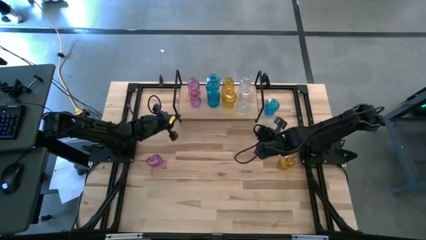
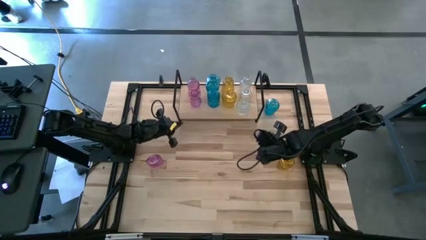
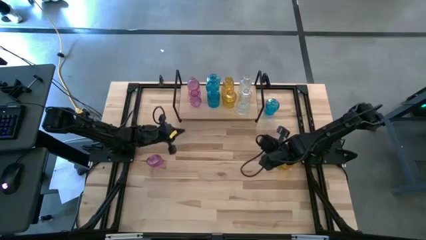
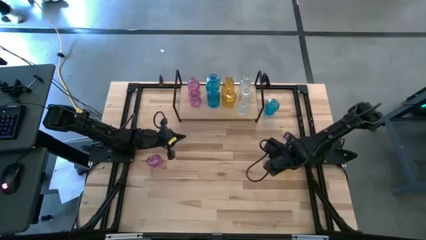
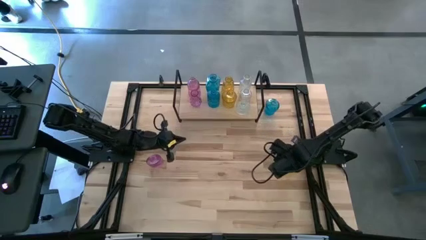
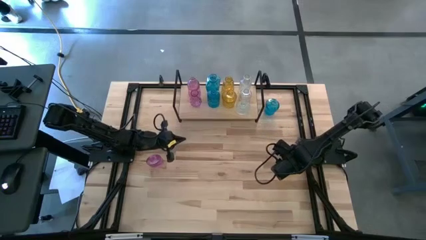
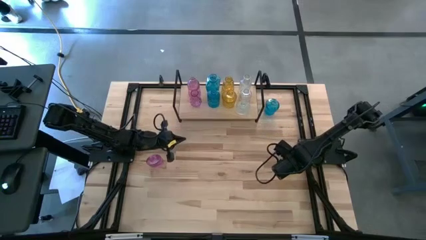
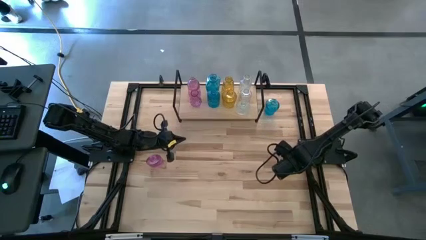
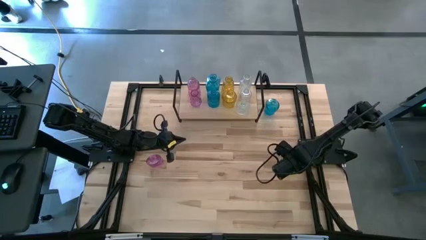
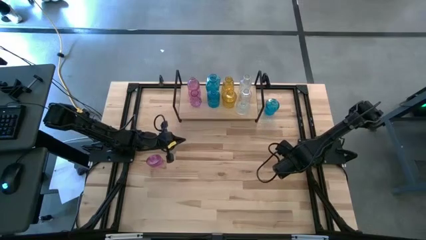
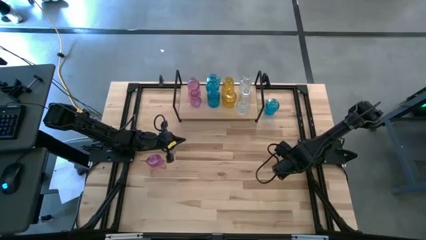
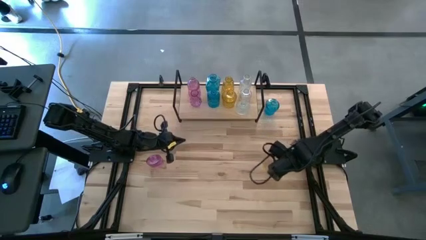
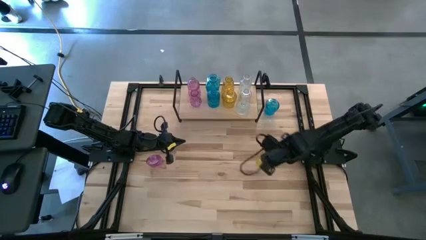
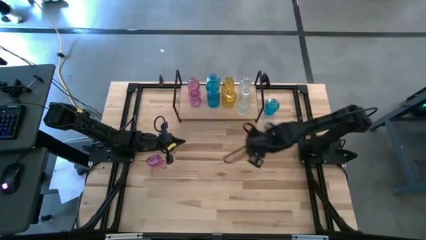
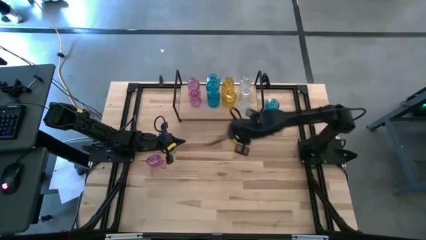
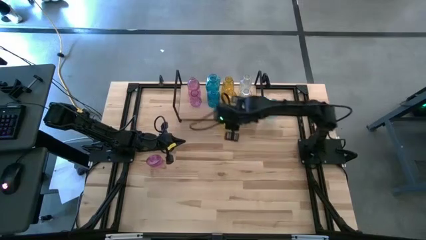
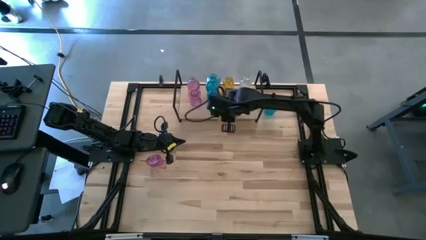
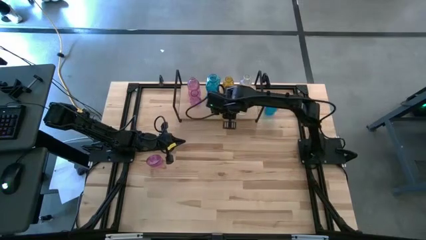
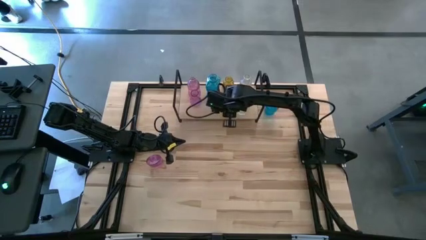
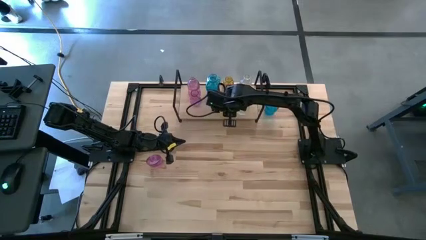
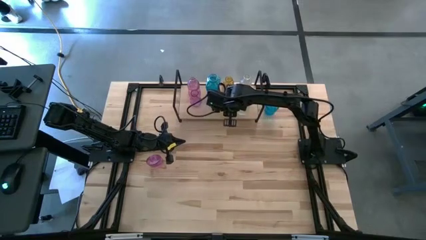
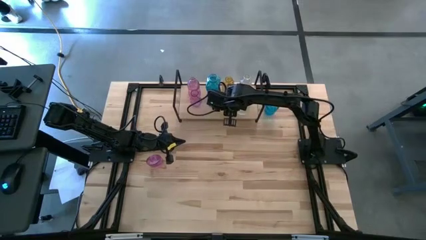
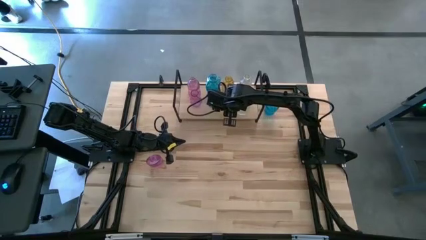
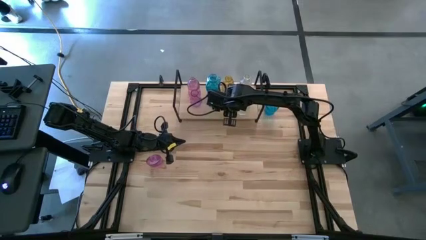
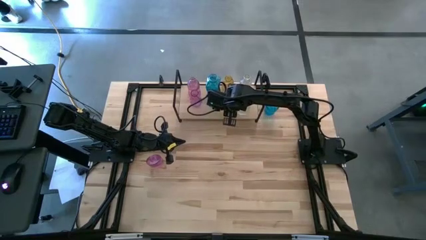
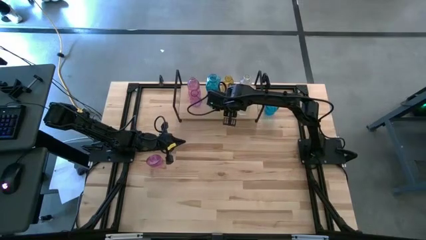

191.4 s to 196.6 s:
Task: sort vases onto shelf
Put the yellow vase on the shelf aligned with the other yellow vase

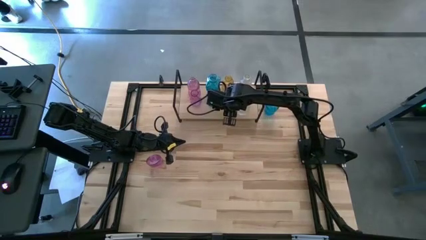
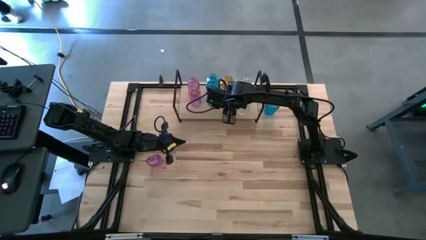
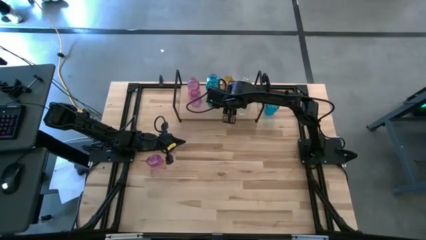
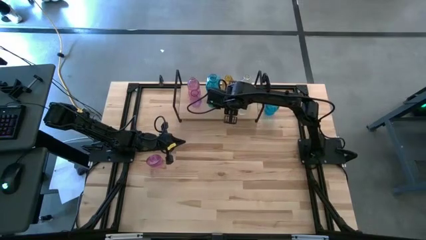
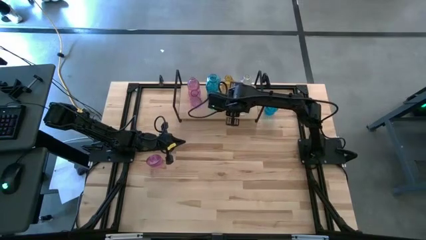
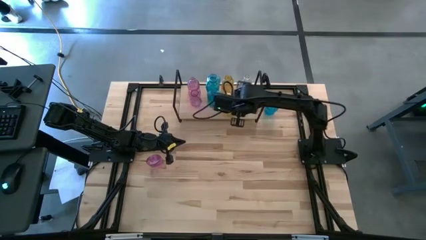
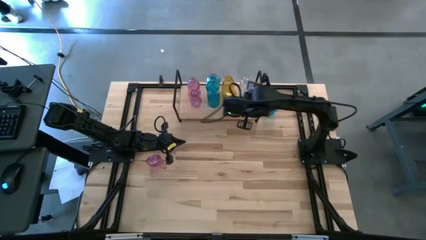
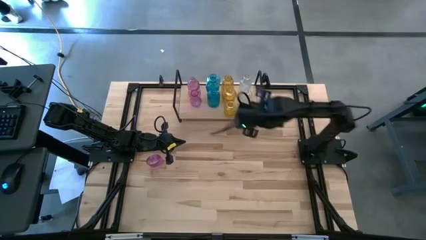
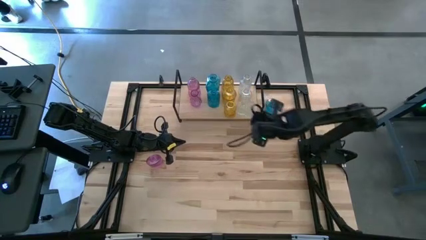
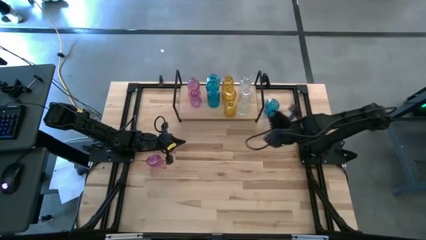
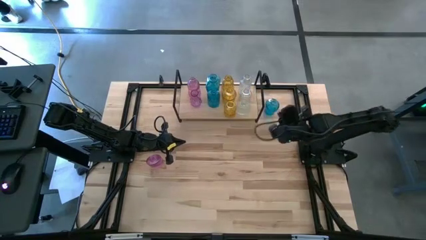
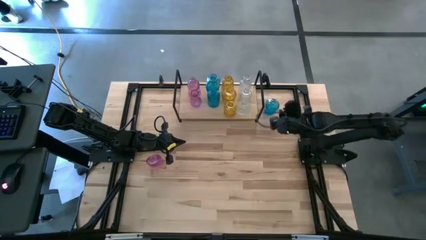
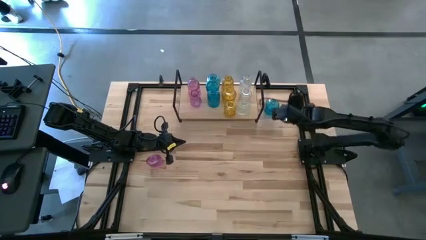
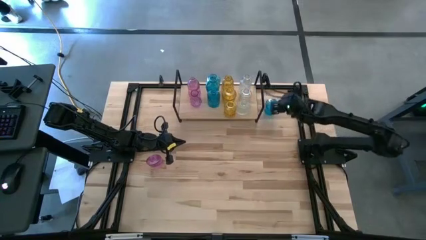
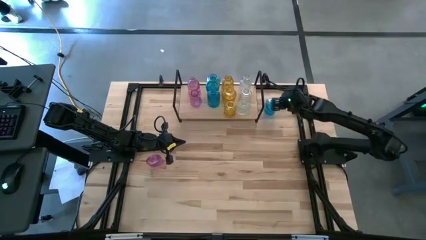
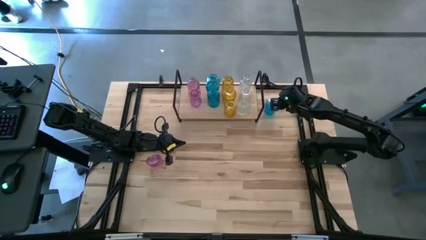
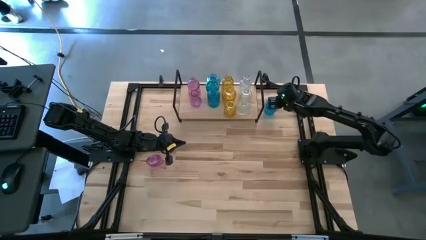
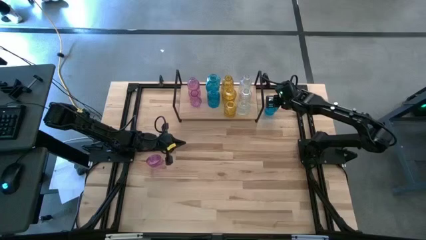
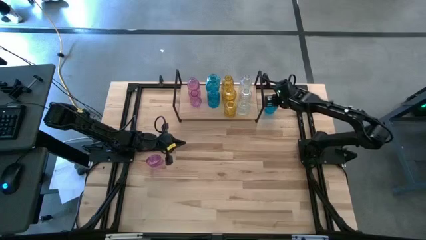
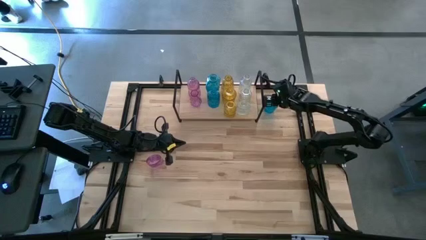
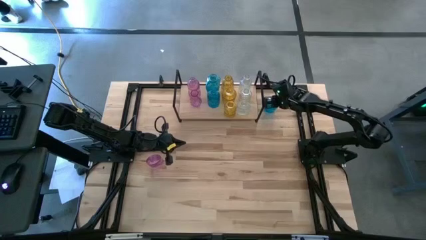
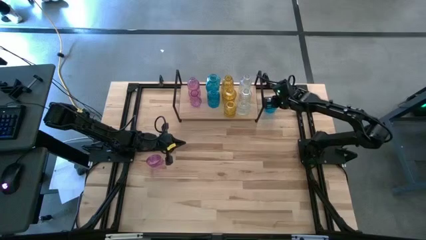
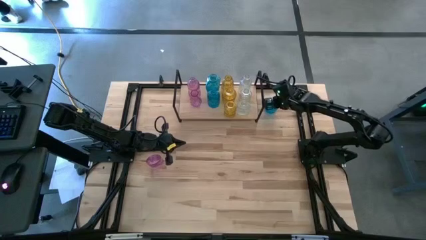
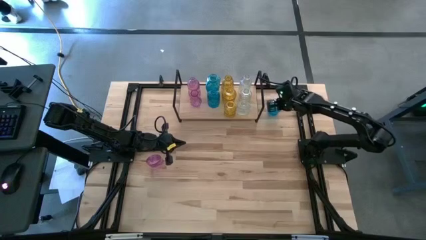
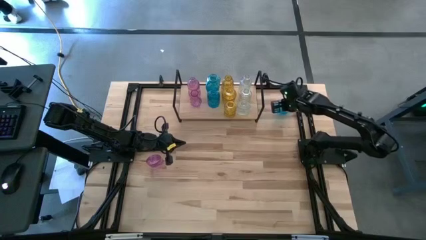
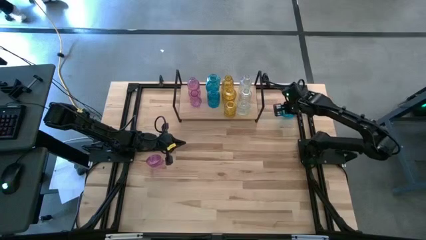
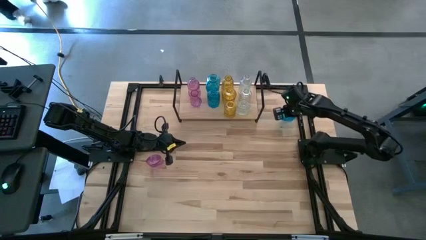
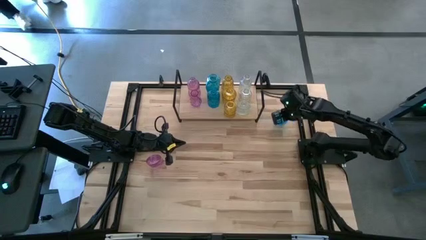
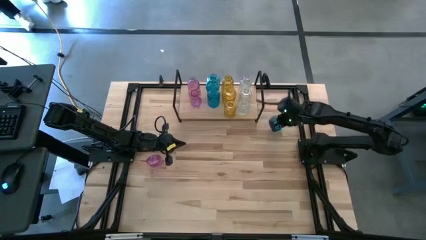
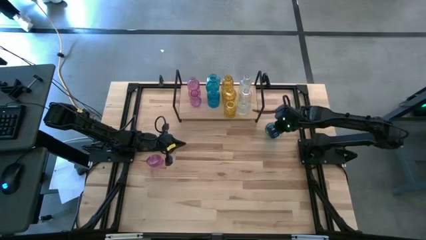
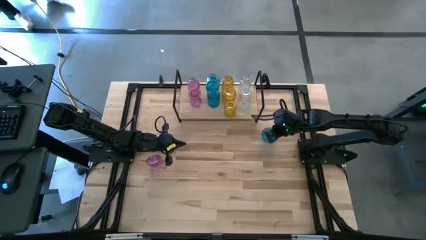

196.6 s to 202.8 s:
Put the blue vase on the shelf aligned with the other blue vase

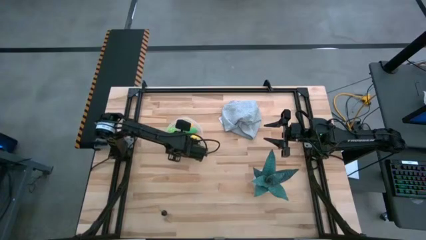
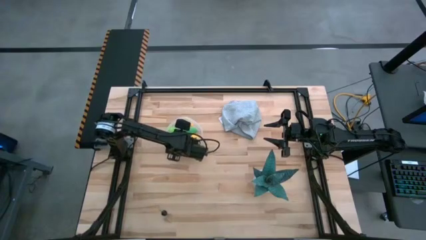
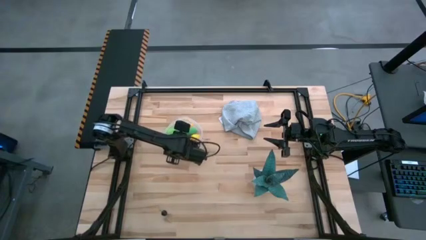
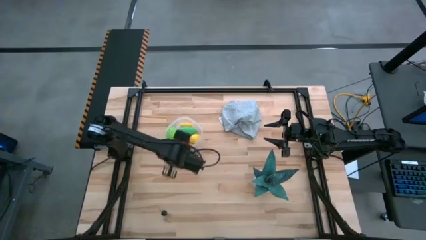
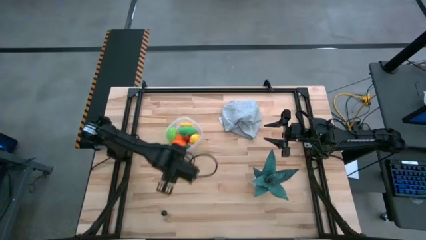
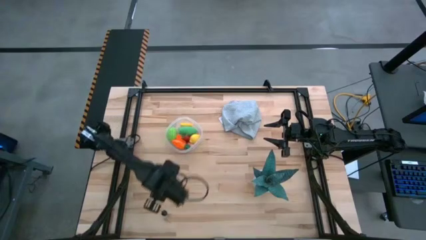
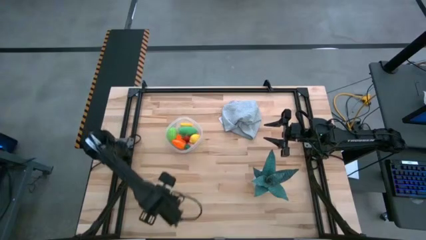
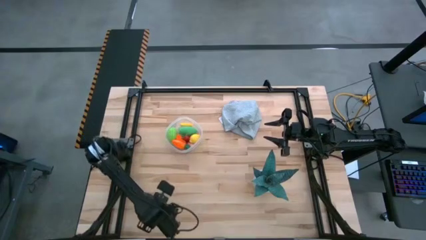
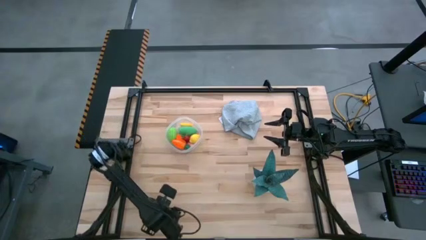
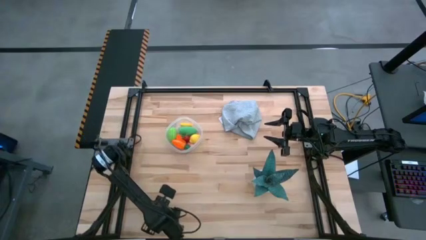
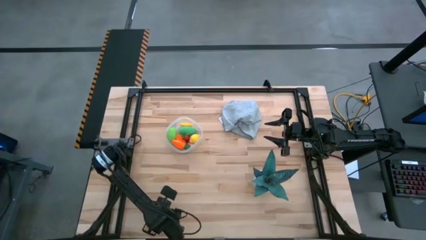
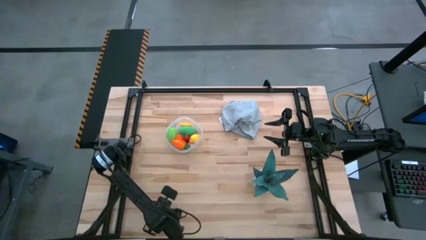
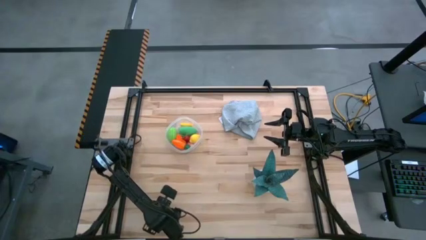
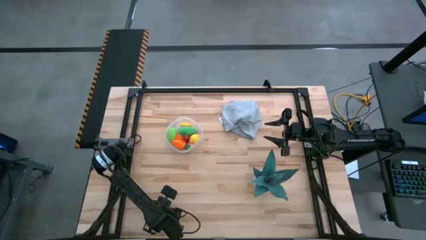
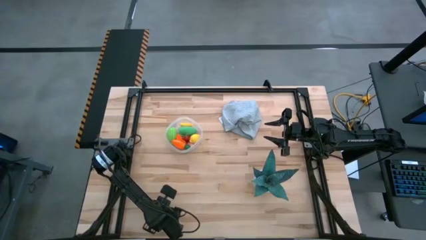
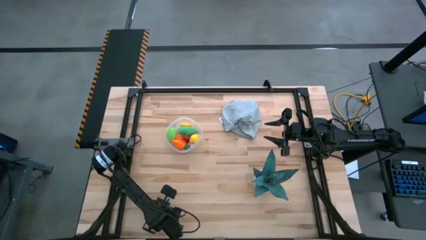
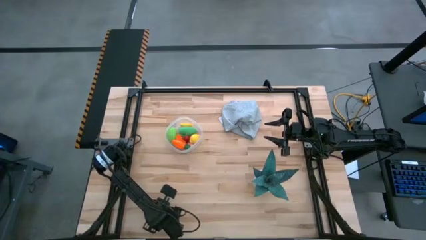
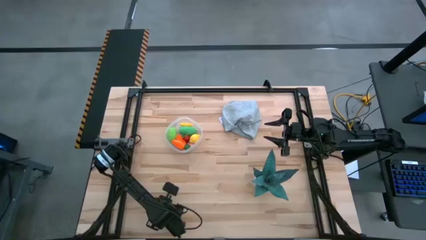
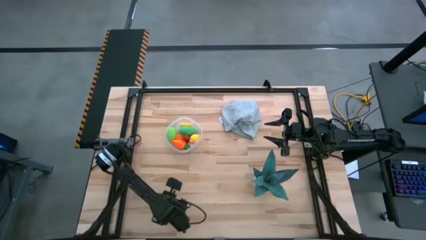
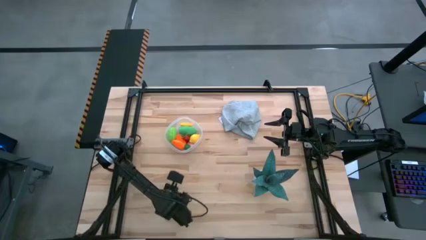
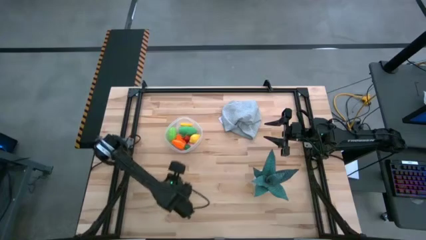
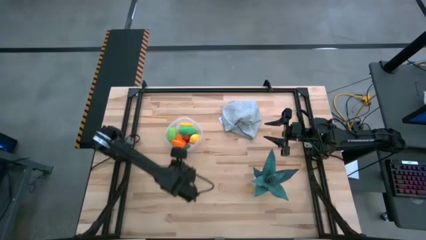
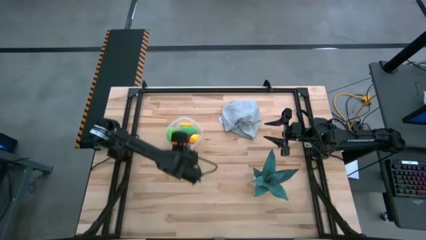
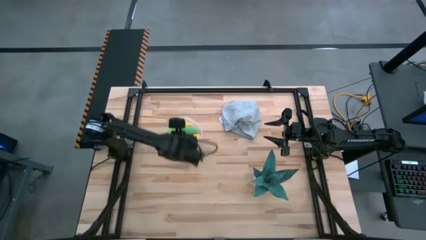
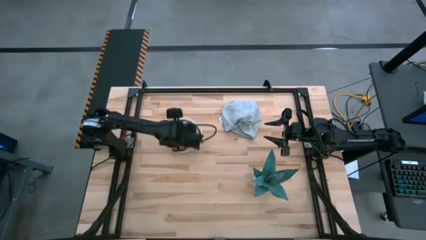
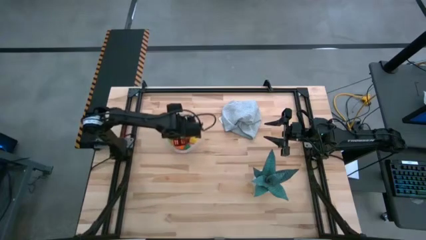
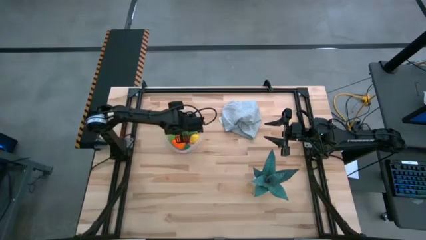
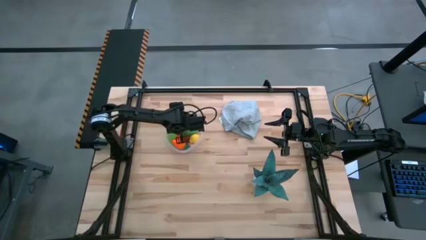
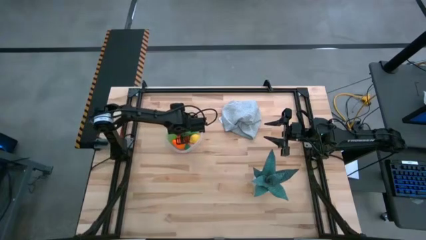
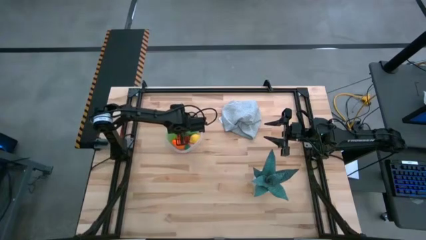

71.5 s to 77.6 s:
Task: Pick and placing Produce into tupperware
Put the black cherry into the transparent container
